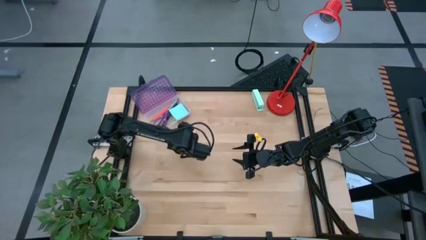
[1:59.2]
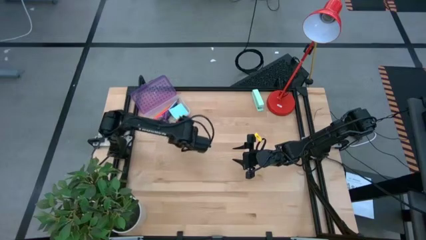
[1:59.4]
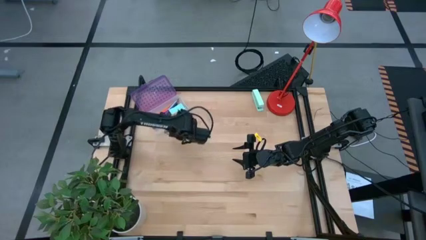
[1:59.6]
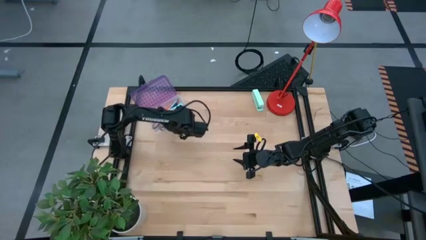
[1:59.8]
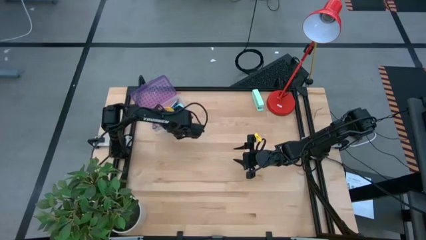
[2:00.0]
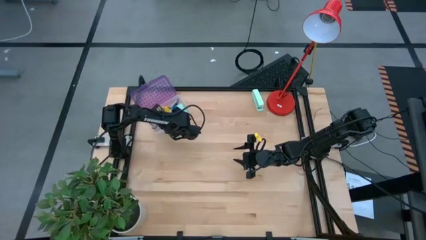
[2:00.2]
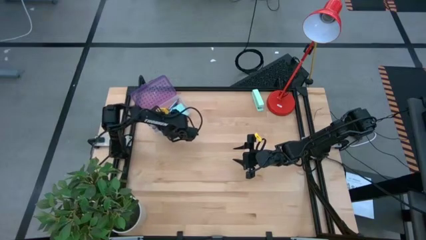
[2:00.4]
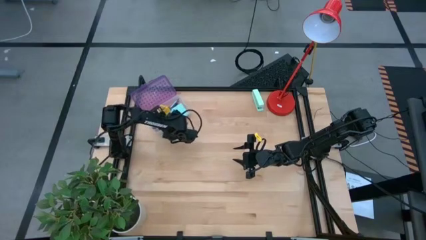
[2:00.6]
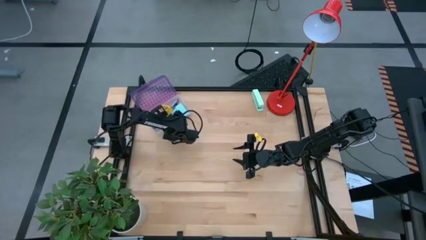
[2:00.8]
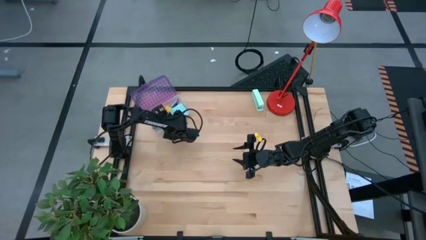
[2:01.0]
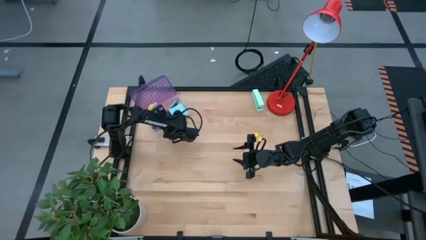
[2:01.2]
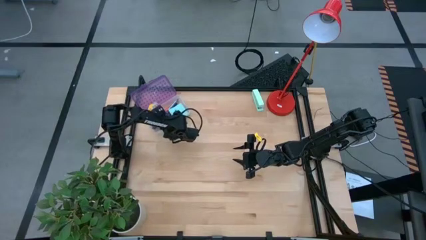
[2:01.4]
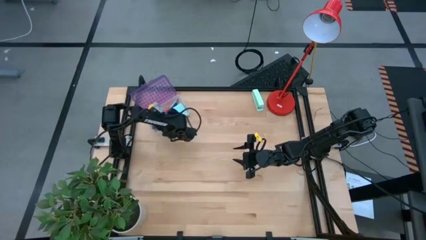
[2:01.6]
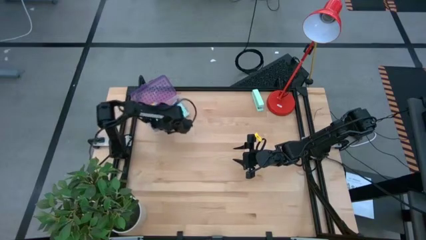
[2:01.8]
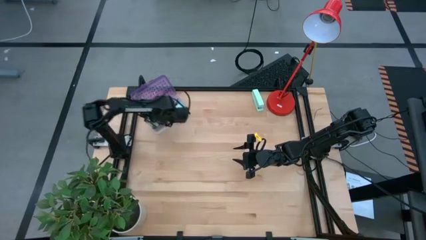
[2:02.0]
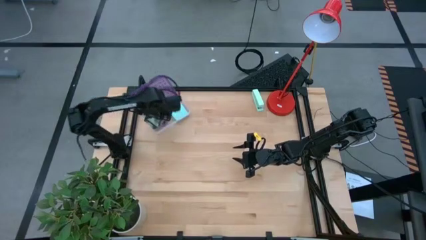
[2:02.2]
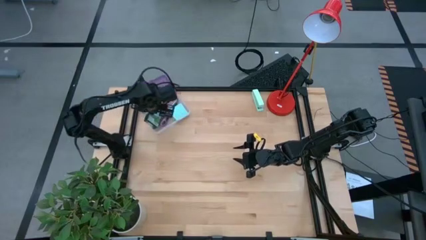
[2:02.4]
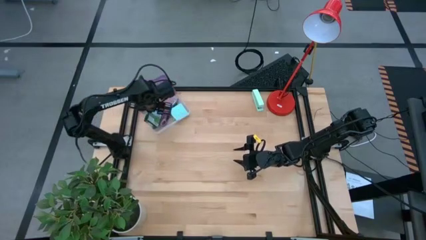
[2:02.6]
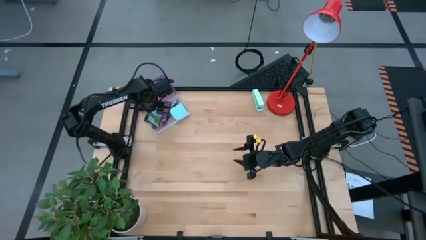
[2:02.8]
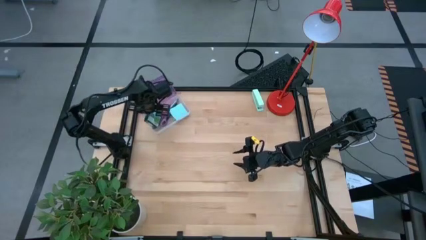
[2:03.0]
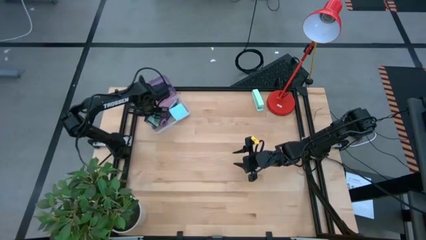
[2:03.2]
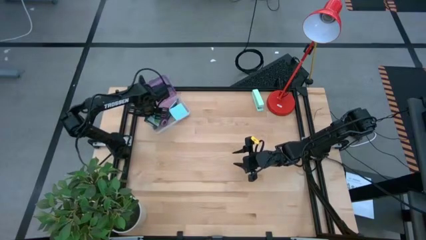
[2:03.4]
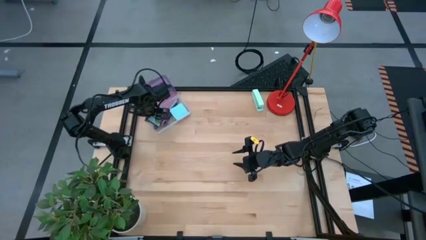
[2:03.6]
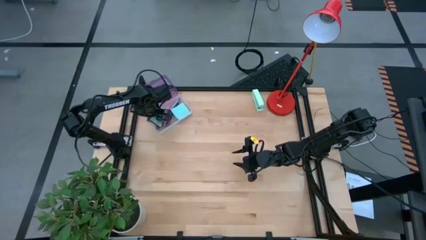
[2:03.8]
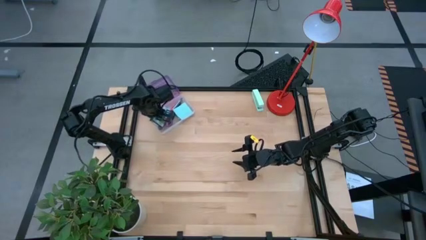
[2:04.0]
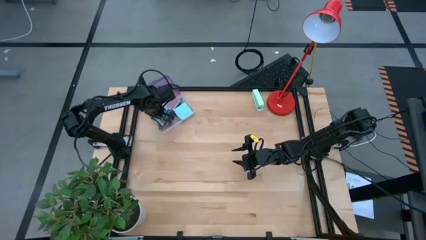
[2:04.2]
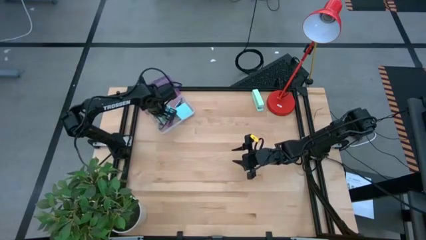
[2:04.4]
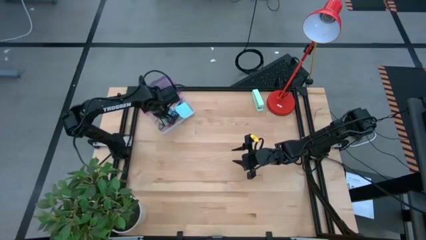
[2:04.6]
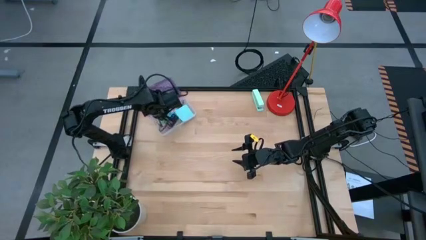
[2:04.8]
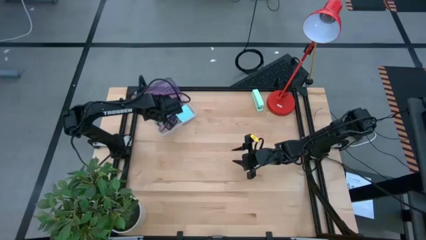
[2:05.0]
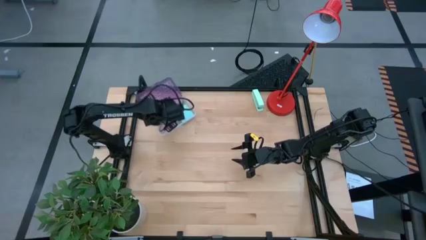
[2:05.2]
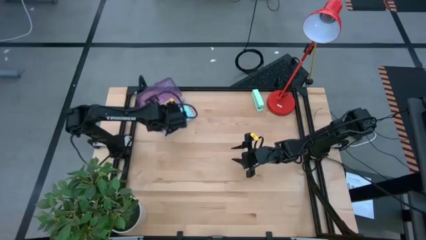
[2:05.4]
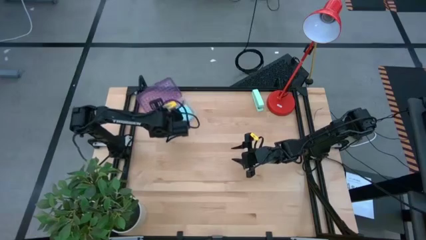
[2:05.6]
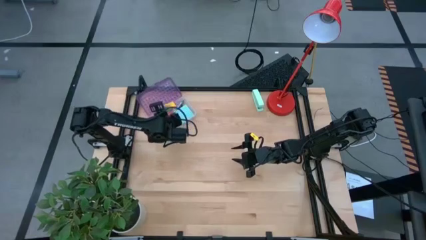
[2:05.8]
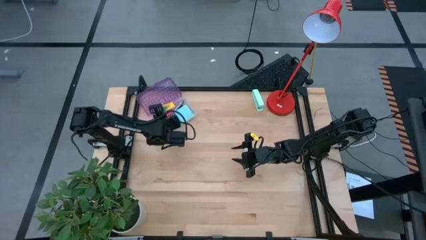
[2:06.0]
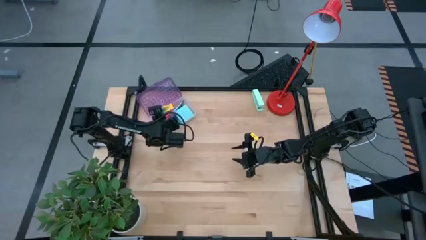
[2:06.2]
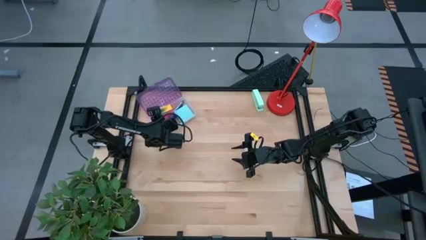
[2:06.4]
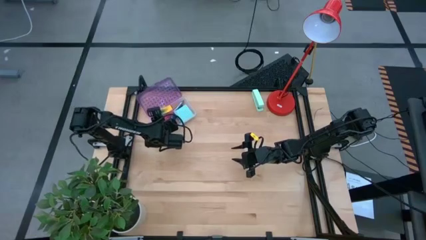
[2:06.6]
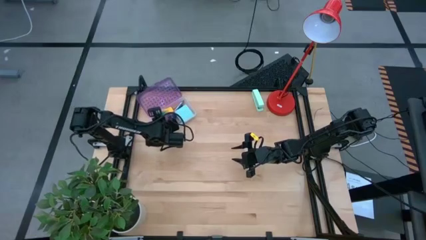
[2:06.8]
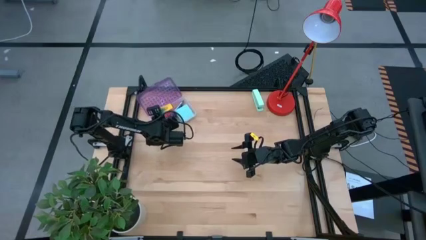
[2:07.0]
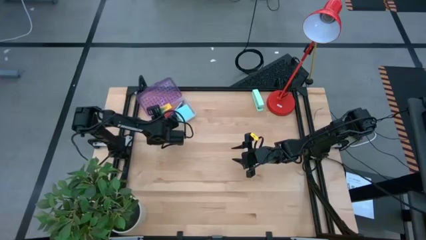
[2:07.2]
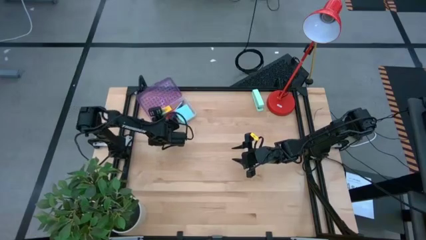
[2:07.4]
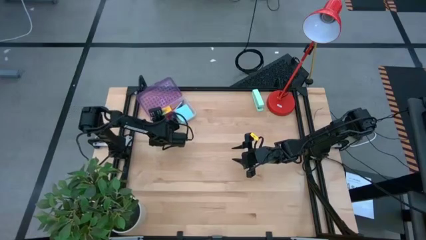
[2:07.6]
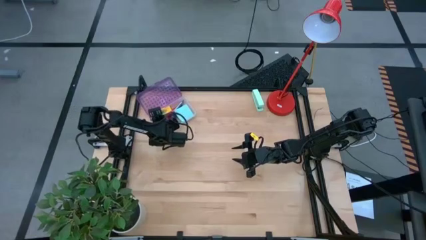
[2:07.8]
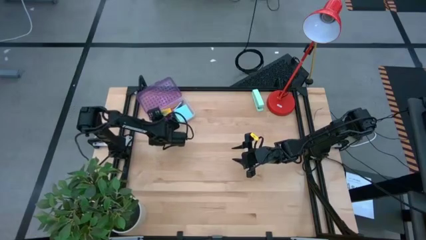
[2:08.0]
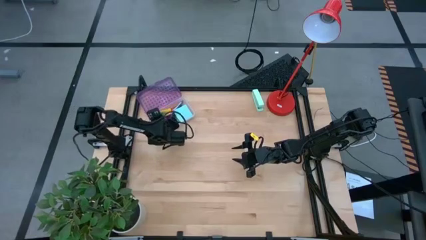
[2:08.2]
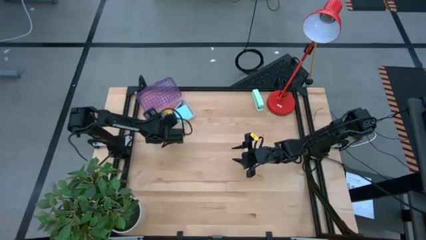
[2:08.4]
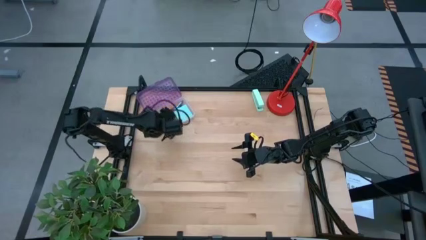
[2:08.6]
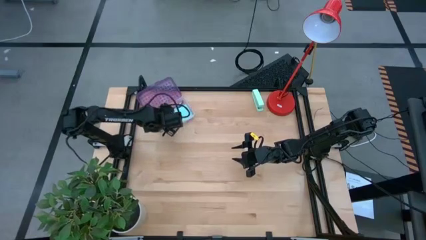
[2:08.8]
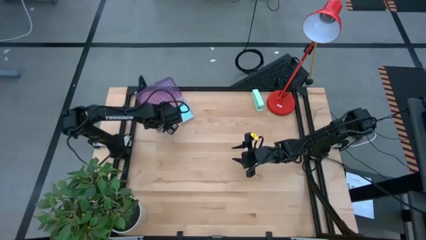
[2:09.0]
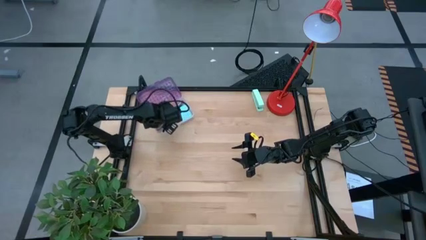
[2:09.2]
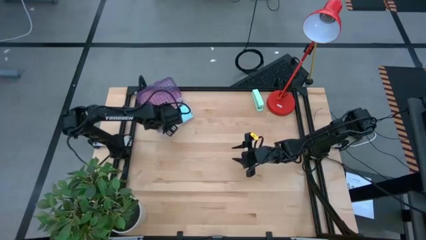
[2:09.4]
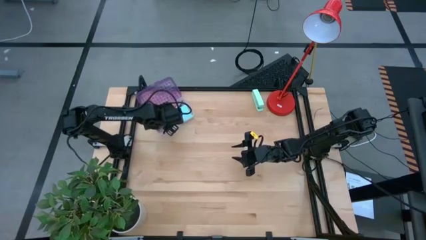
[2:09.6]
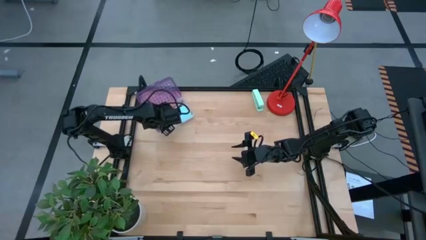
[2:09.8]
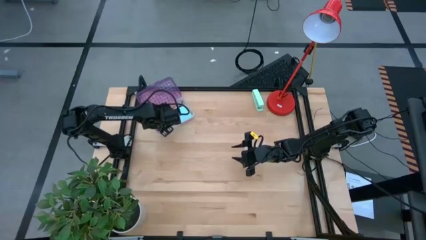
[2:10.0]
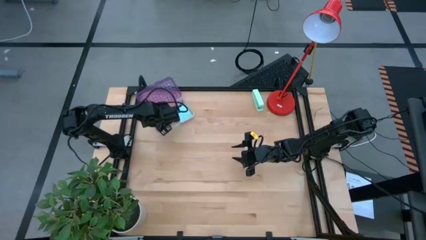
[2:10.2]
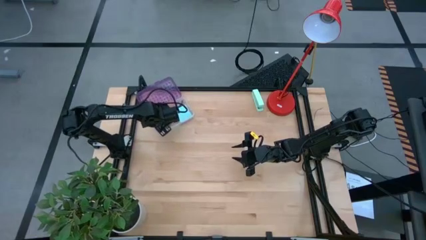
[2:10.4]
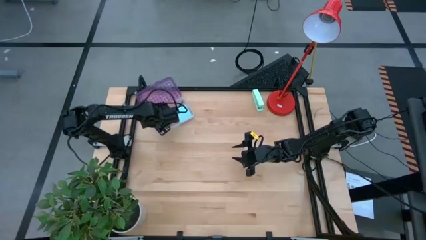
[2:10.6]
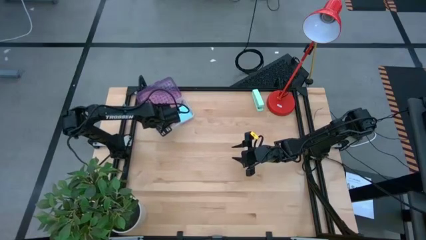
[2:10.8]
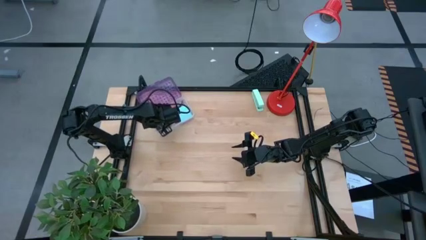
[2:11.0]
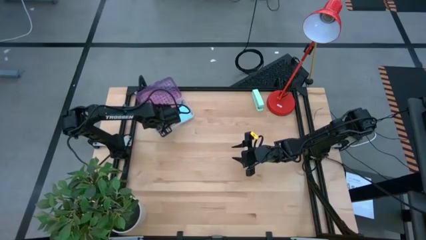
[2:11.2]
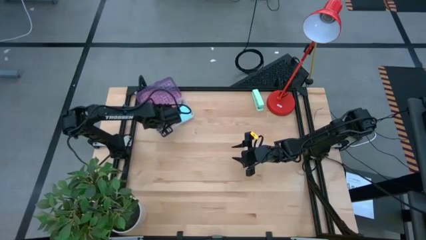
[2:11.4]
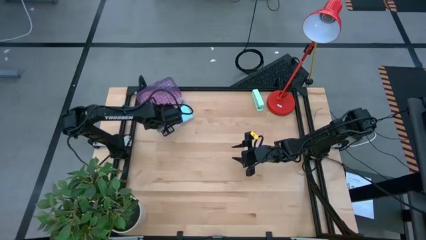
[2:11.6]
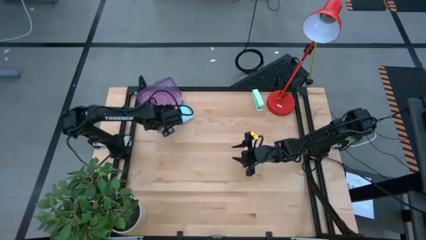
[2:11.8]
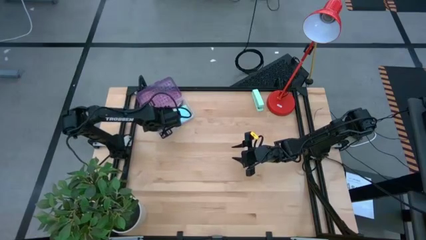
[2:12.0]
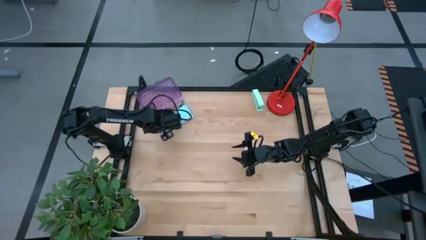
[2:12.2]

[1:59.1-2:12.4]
Task: Pack school essentials
Put the crayon box into the purple supply box
